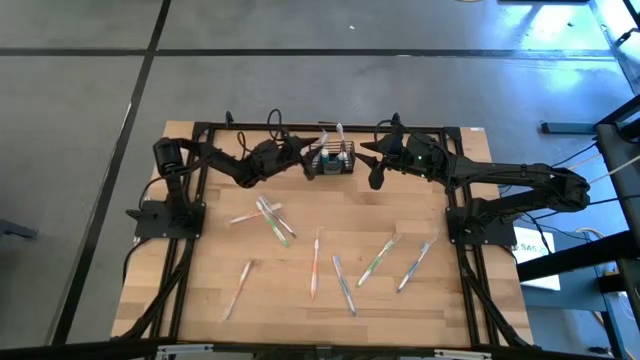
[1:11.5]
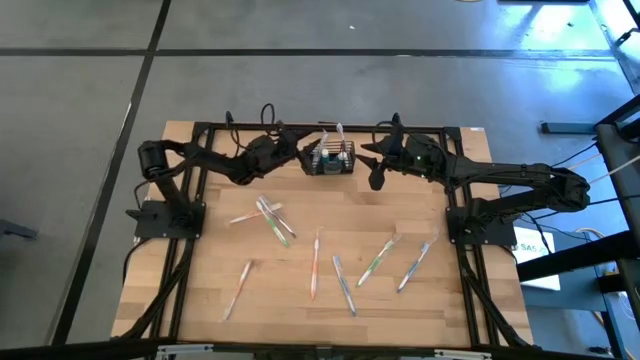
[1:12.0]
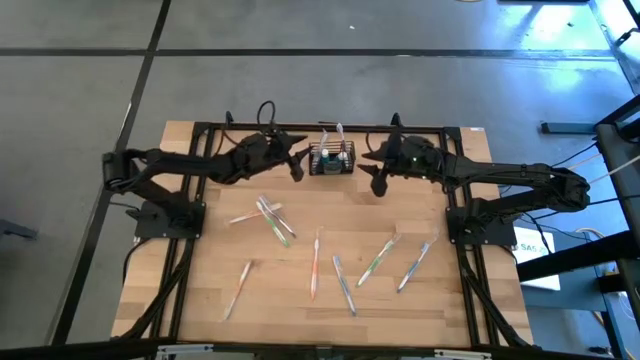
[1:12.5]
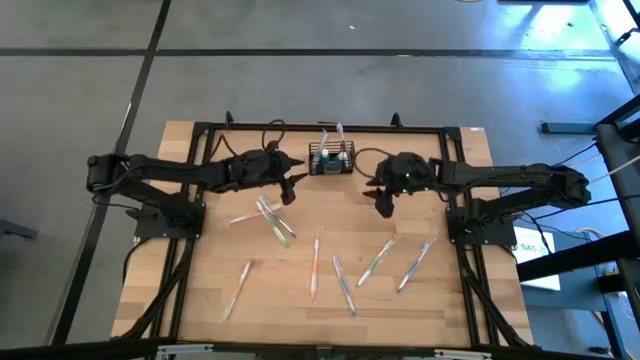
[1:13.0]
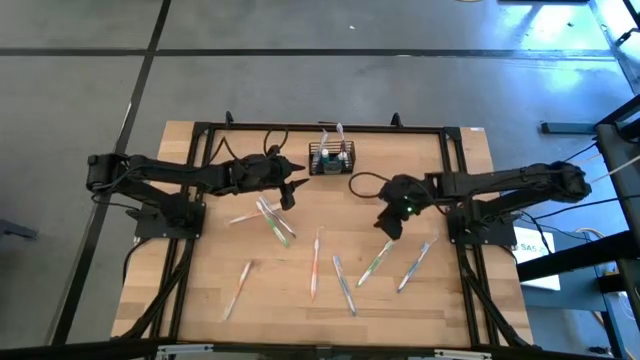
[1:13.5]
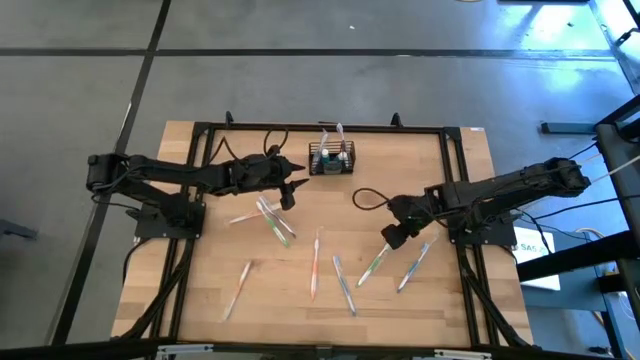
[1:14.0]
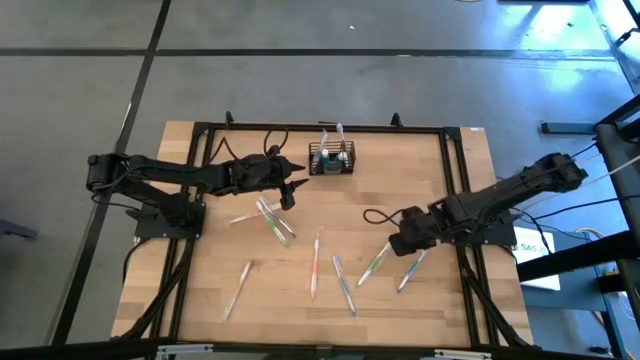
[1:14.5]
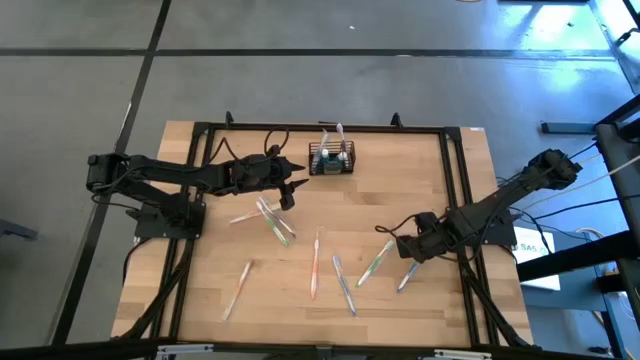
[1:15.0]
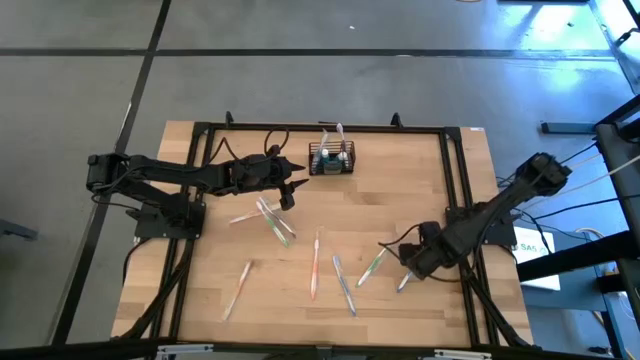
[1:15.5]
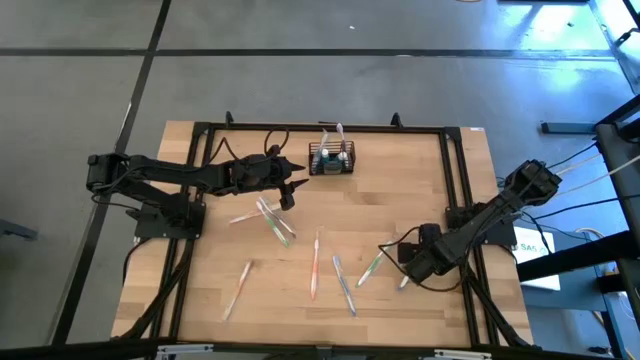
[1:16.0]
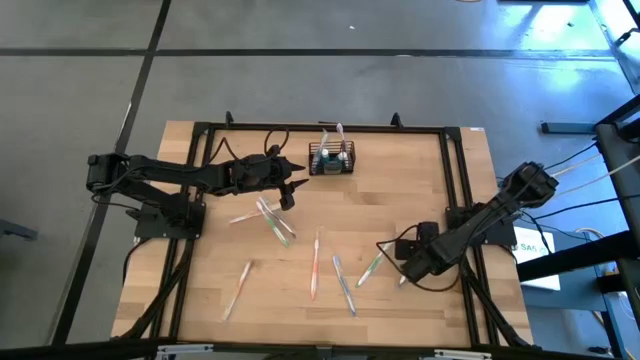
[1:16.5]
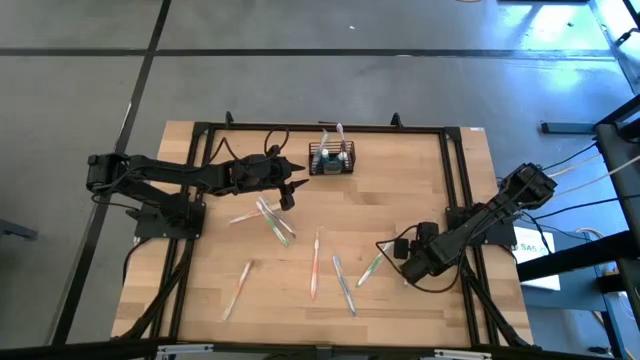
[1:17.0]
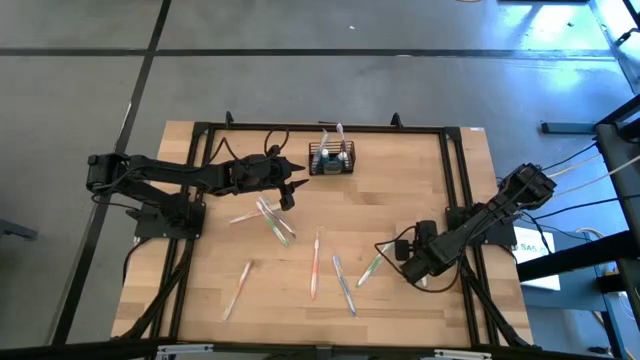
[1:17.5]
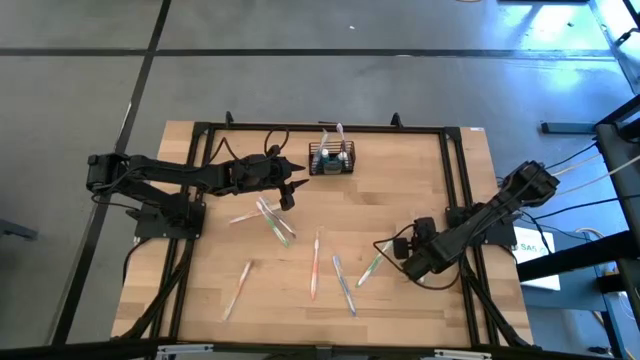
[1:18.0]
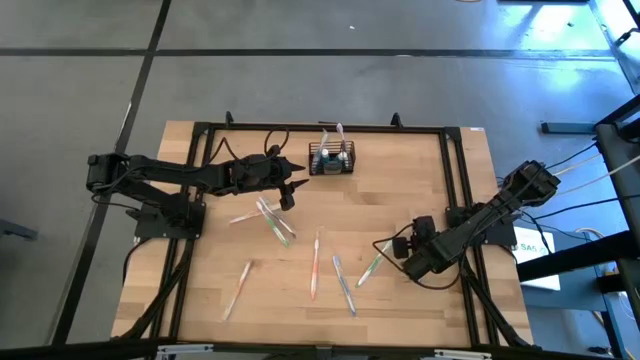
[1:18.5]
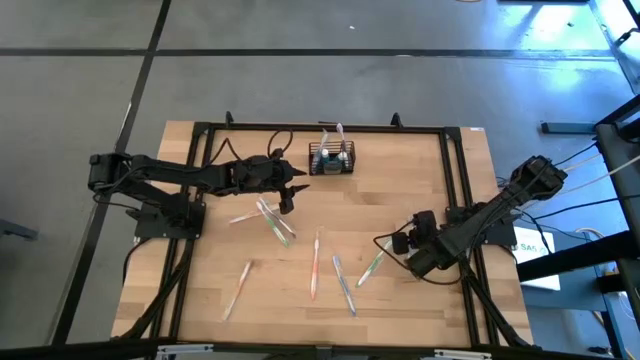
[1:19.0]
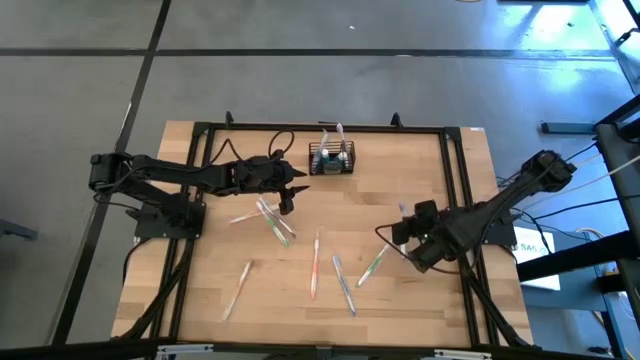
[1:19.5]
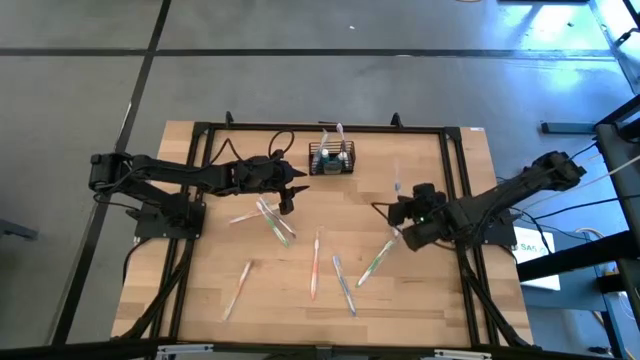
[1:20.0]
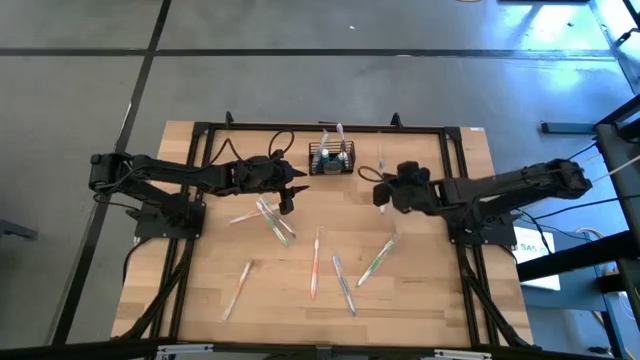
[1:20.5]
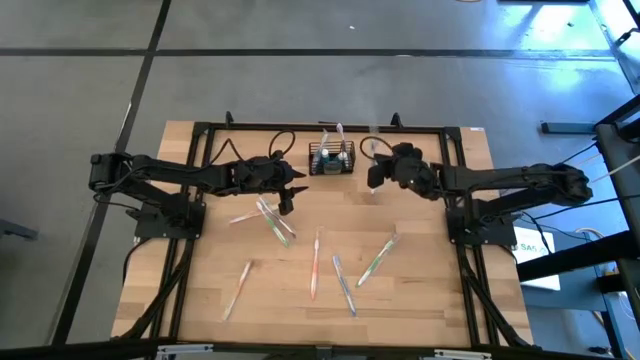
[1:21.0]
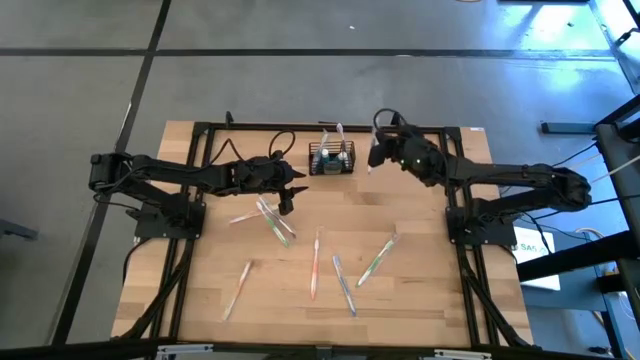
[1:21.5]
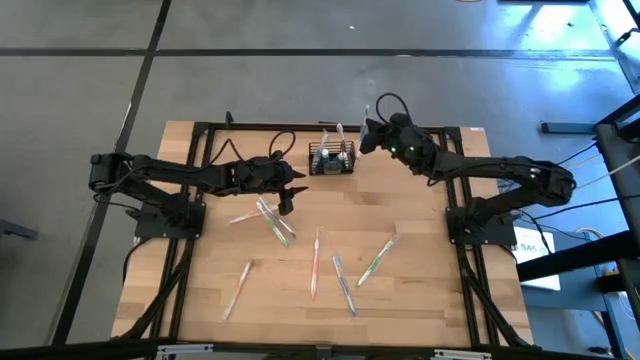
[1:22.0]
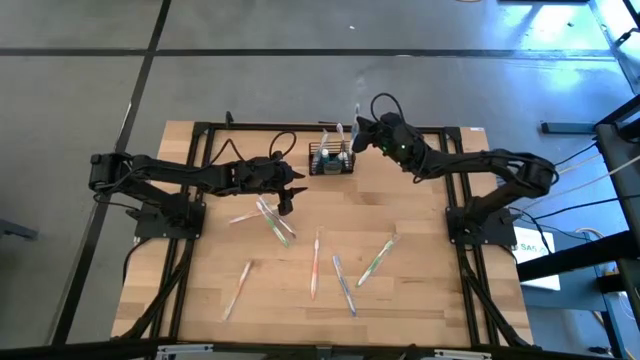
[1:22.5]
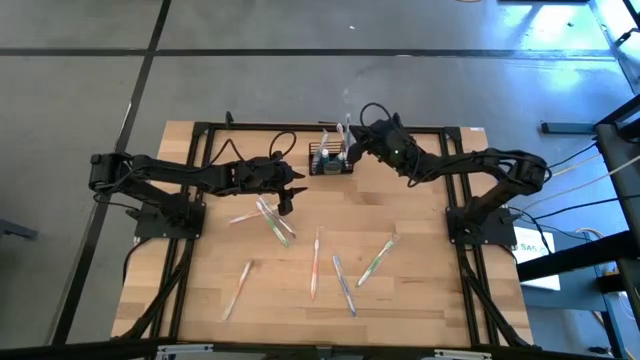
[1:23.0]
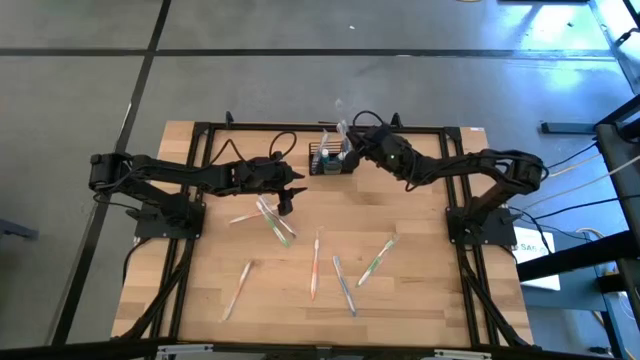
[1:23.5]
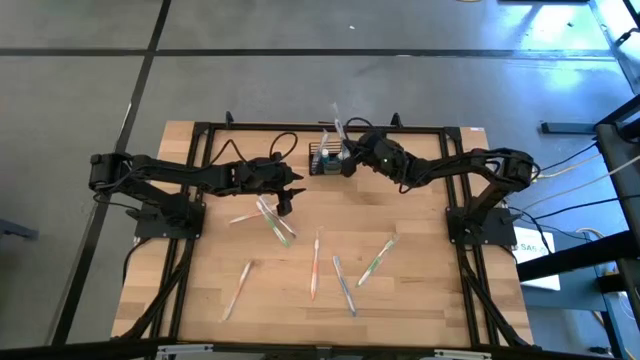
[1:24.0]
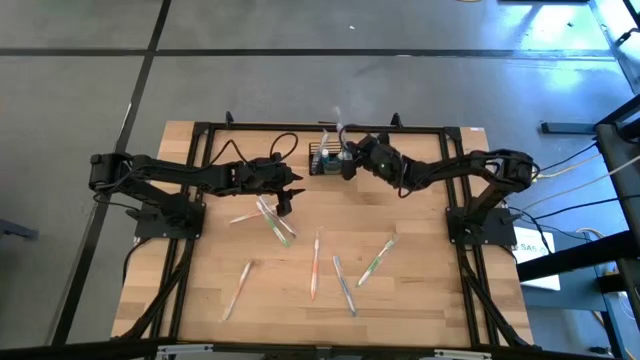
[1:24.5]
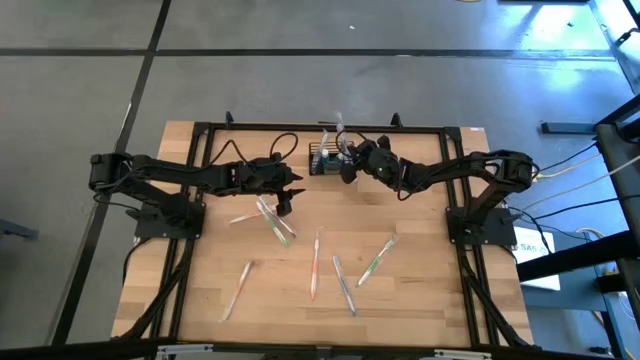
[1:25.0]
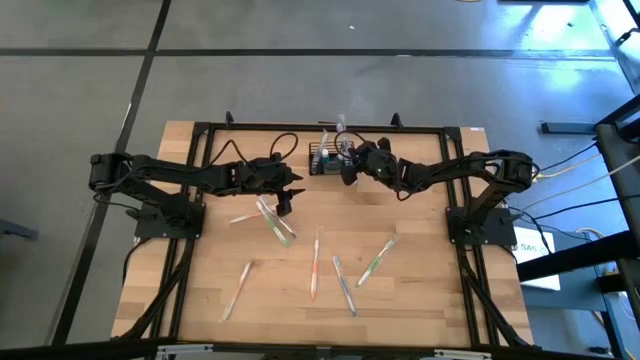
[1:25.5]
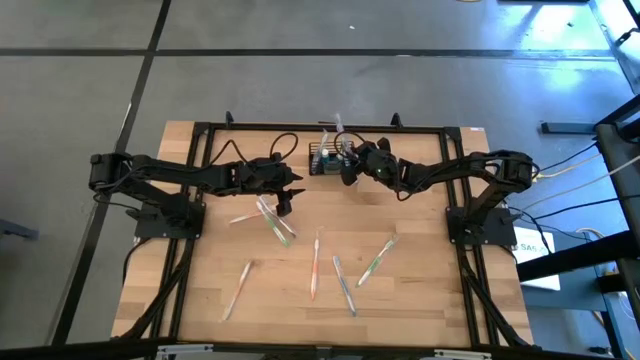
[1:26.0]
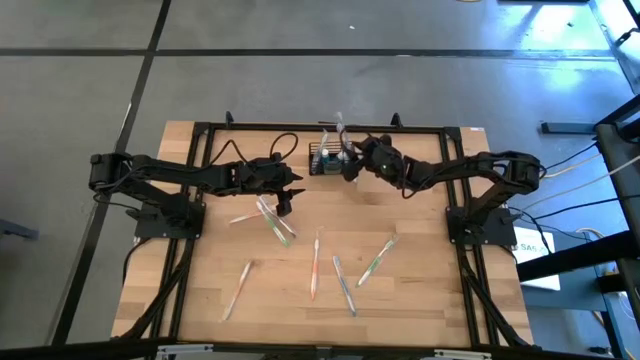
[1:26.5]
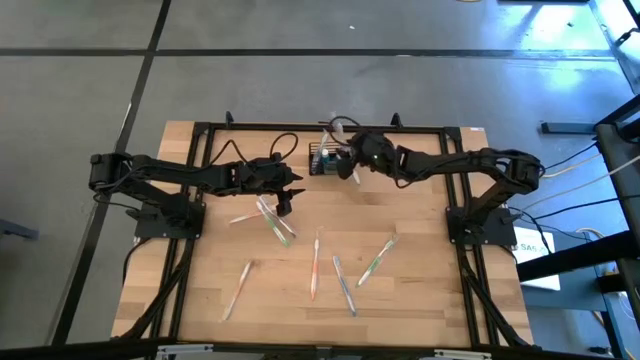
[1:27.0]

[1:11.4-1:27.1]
Task: Pick & Place toothbrushing station
Put the right blue toothbrush in the right section of the wire organizer

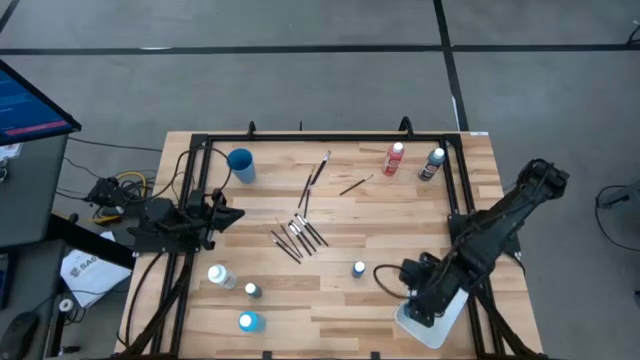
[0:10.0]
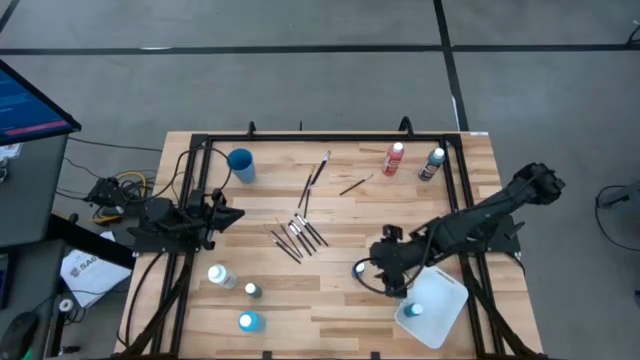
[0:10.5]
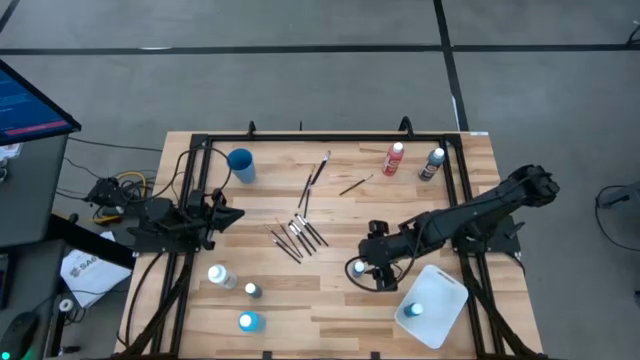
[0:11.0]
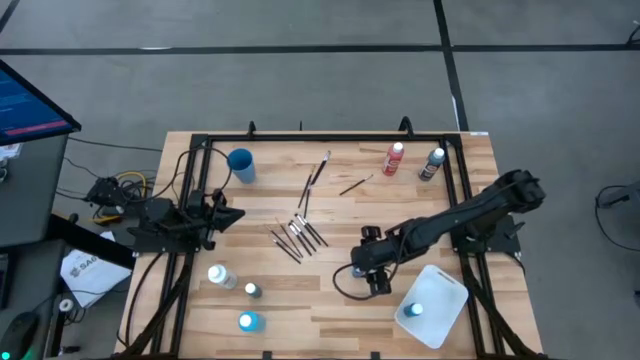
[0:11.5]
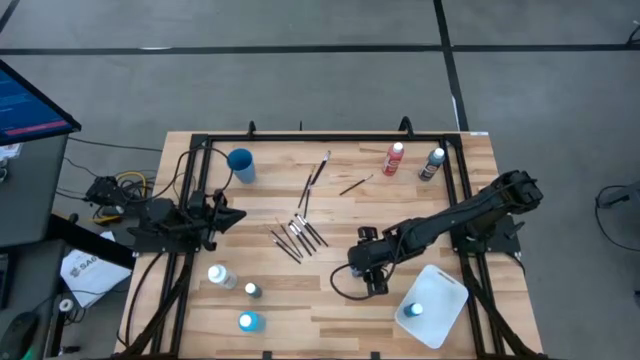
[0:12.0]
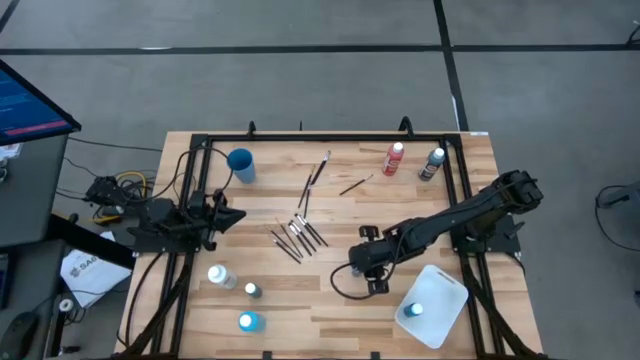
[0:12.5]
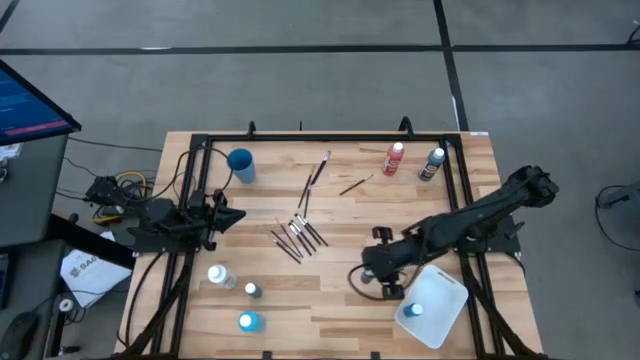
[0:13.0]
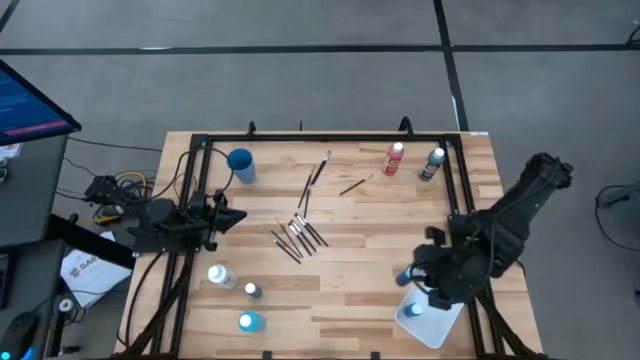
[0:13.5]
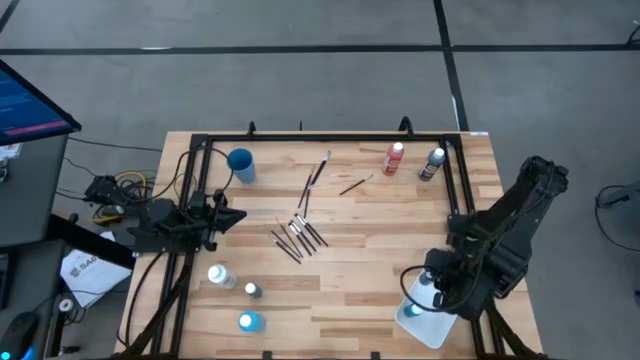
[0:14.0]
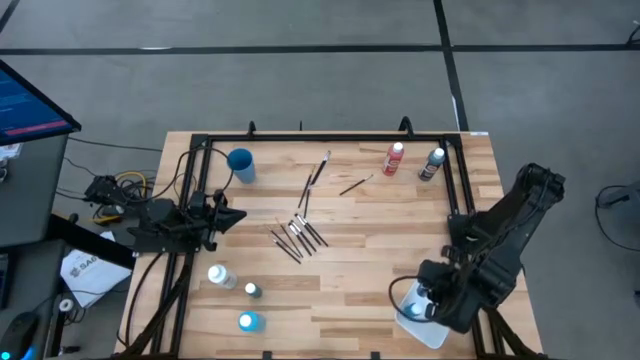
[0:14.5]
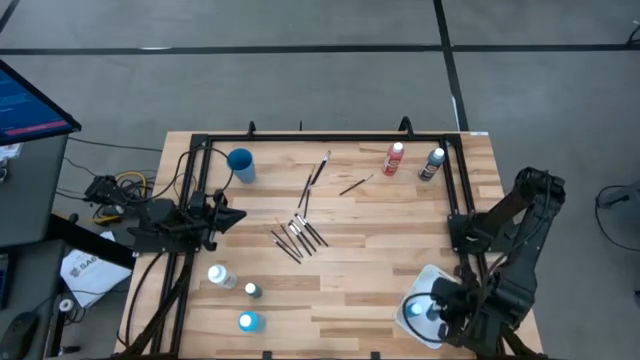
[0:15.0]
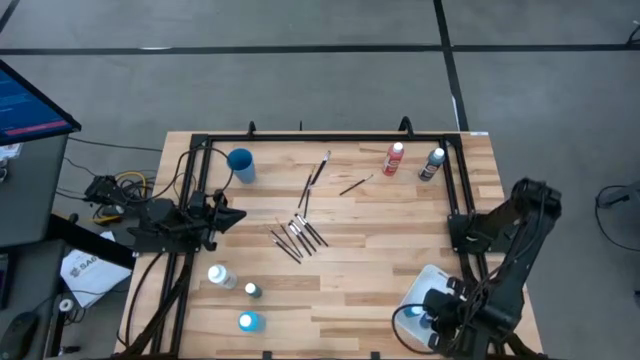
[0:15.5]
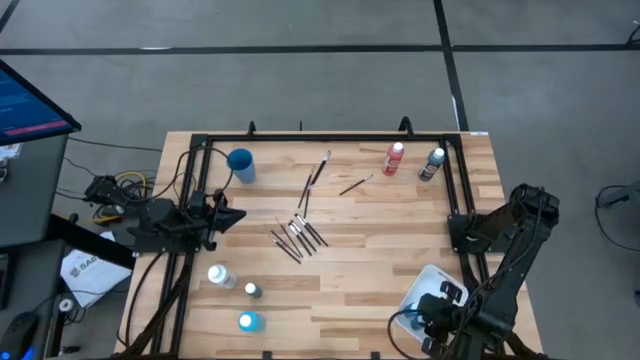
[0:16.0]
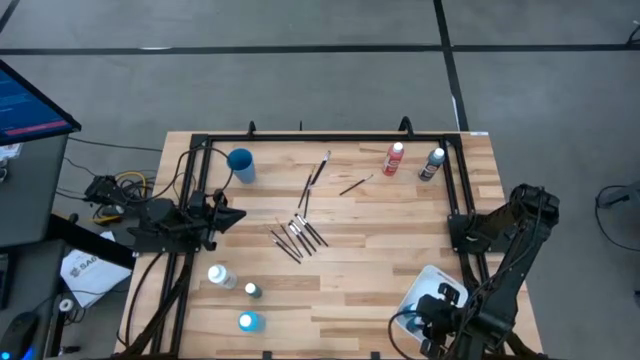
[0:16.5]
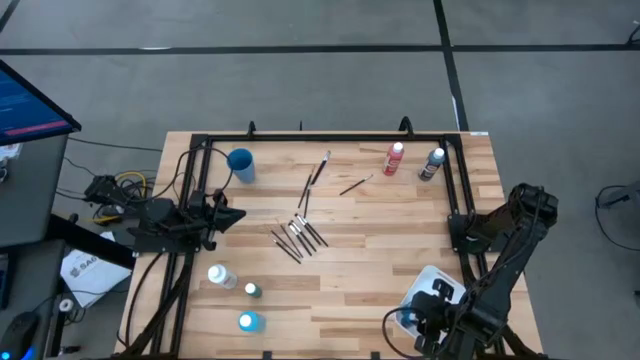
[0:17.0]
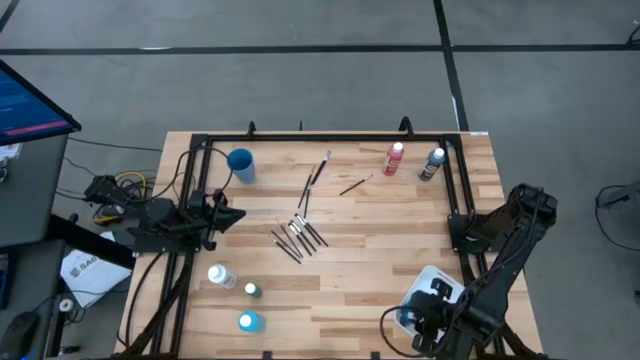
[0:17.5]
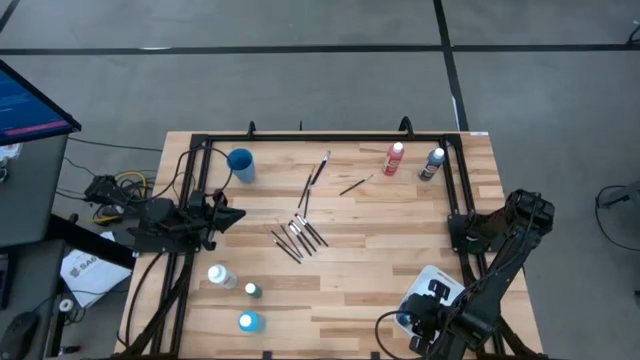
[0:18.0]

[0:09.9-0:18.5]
Task: Pick & Place Paint Supplies
Put the small blue paint bottle into the white bin
